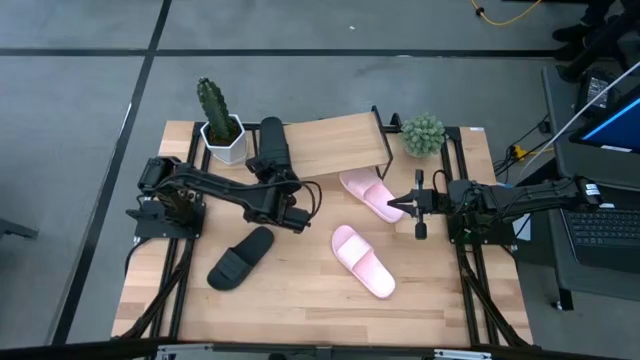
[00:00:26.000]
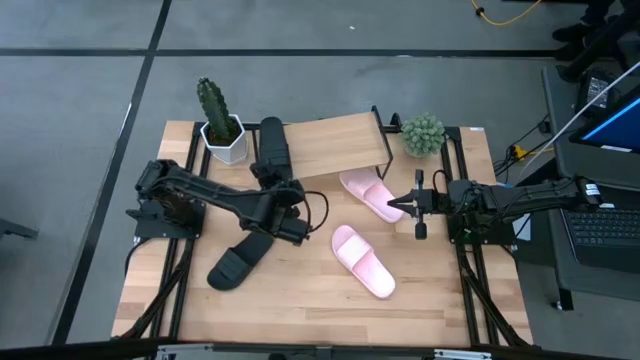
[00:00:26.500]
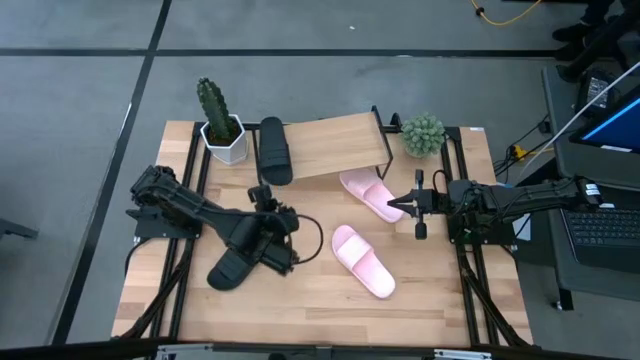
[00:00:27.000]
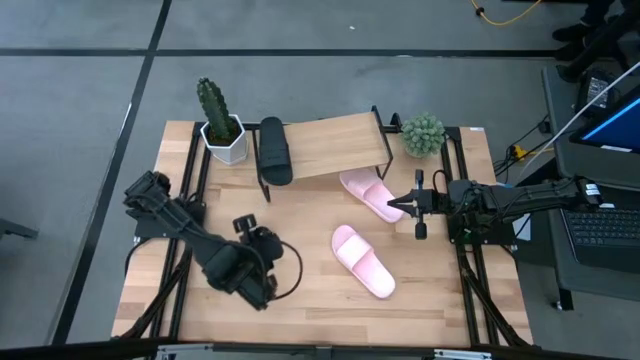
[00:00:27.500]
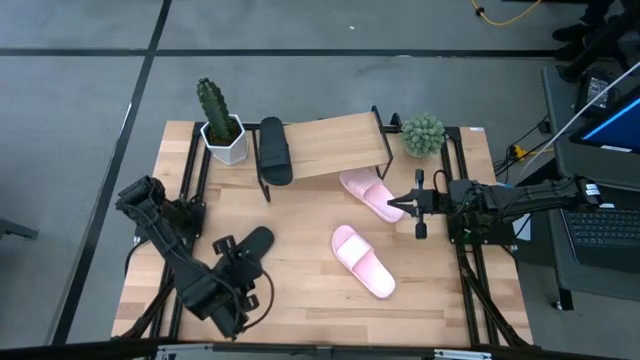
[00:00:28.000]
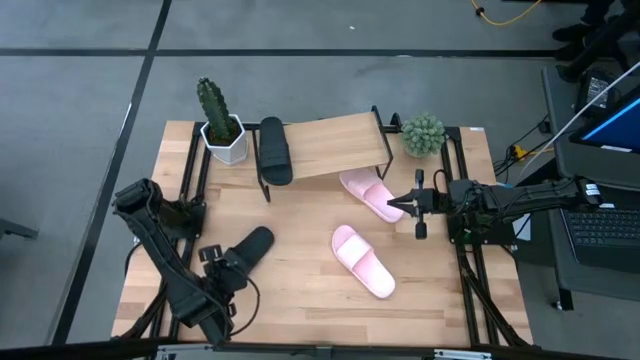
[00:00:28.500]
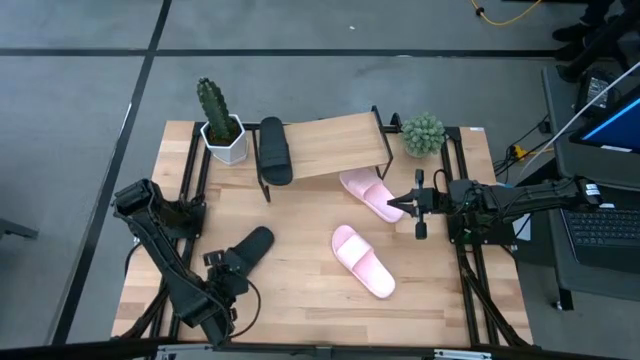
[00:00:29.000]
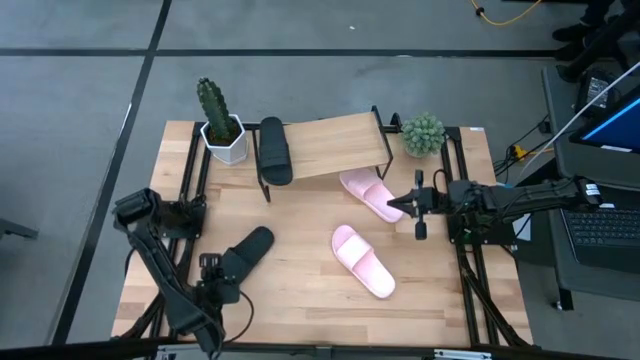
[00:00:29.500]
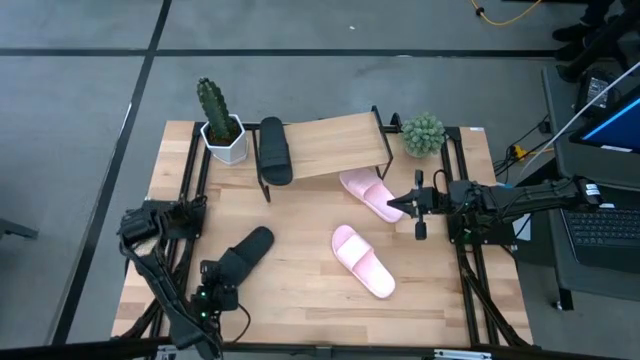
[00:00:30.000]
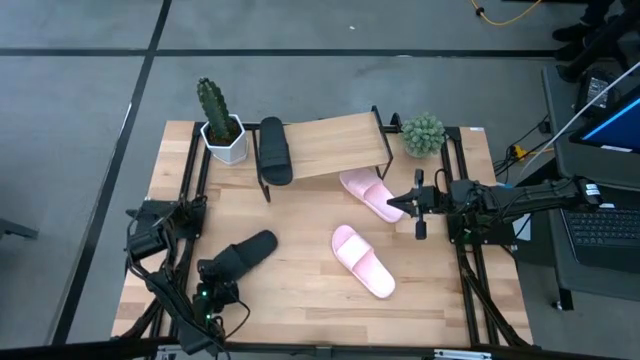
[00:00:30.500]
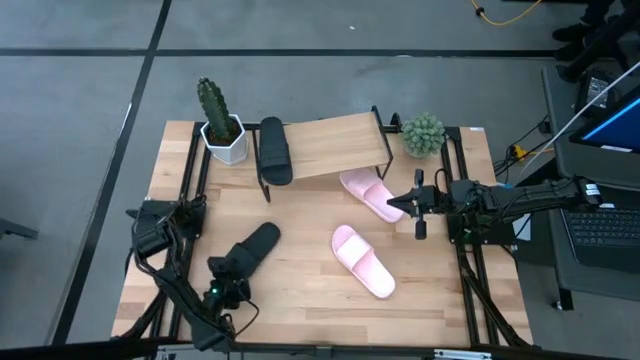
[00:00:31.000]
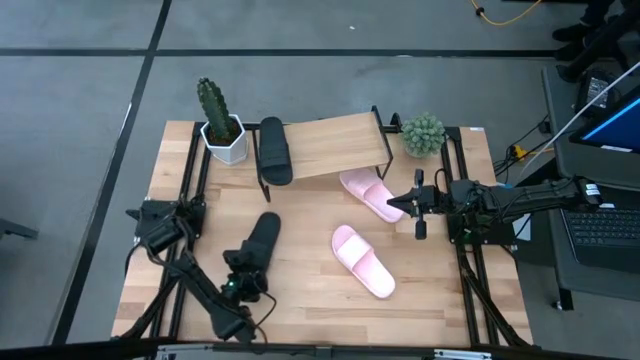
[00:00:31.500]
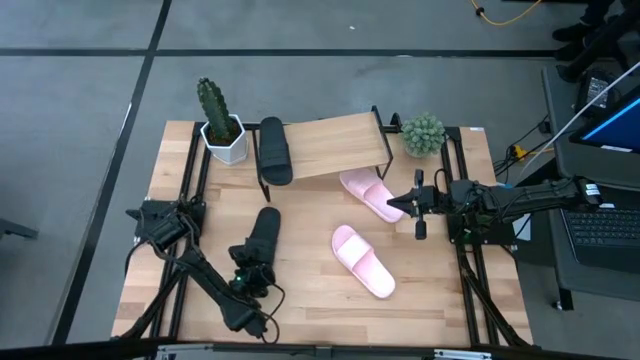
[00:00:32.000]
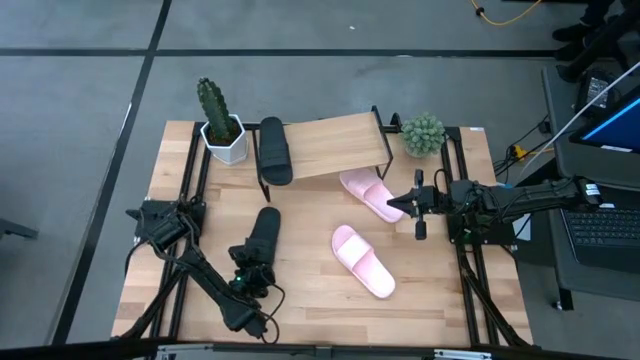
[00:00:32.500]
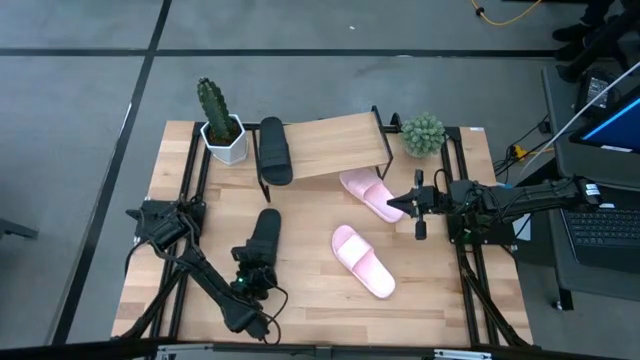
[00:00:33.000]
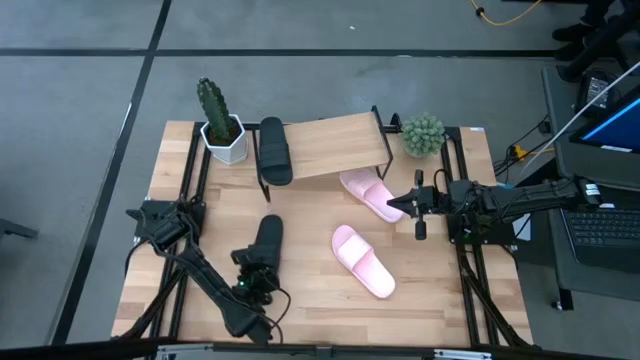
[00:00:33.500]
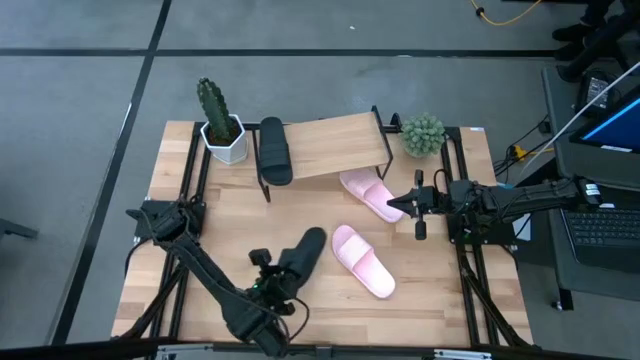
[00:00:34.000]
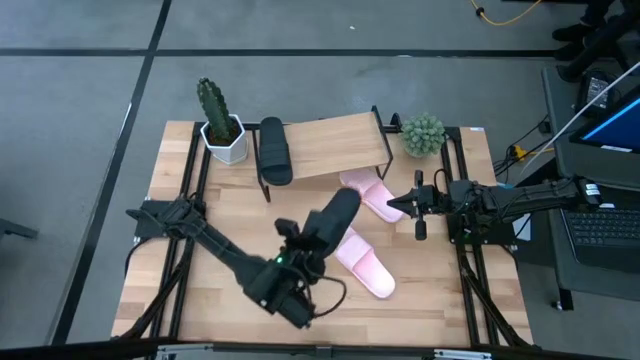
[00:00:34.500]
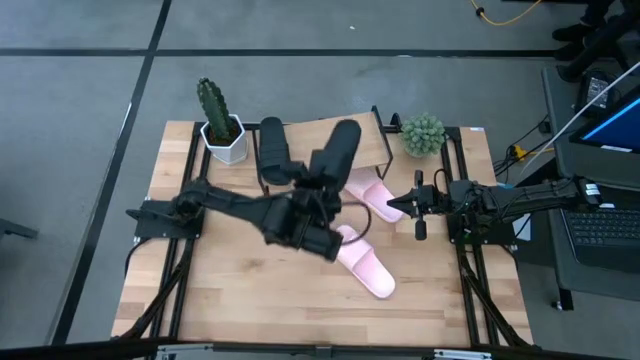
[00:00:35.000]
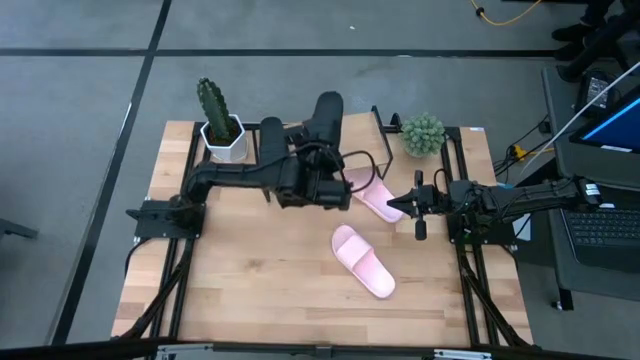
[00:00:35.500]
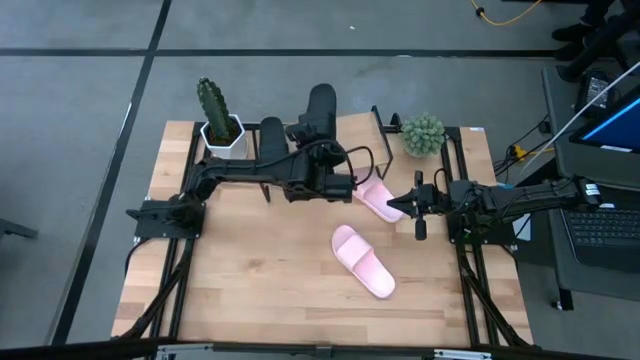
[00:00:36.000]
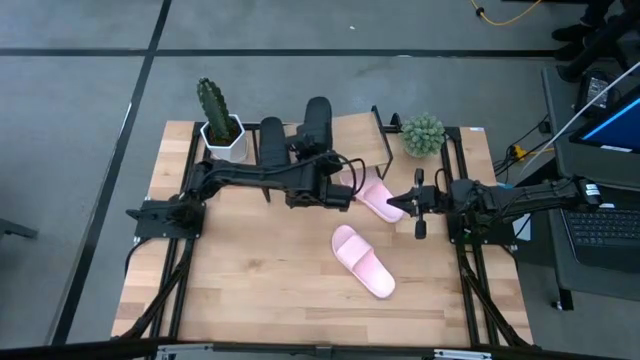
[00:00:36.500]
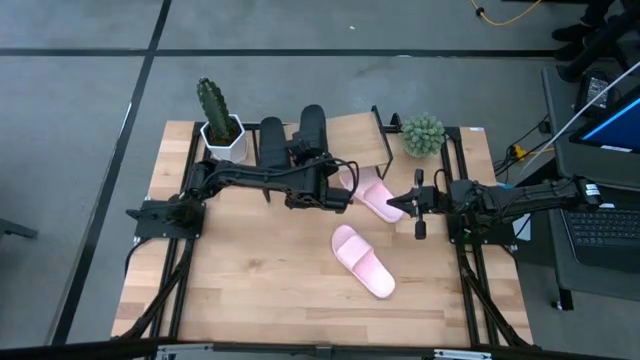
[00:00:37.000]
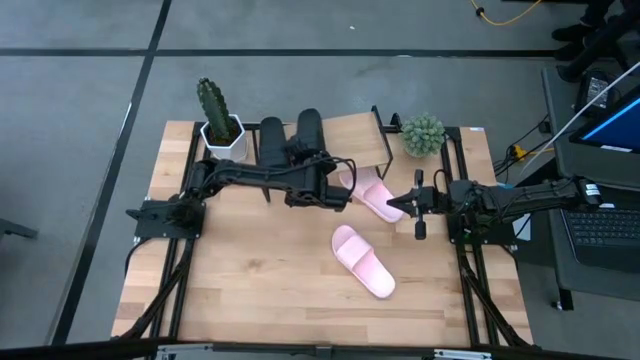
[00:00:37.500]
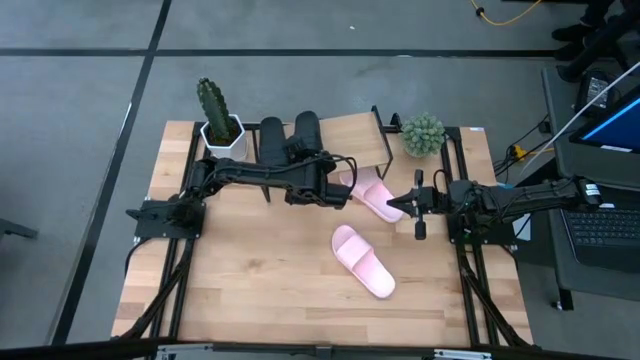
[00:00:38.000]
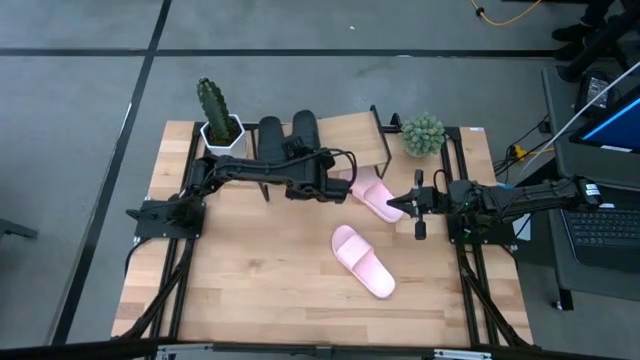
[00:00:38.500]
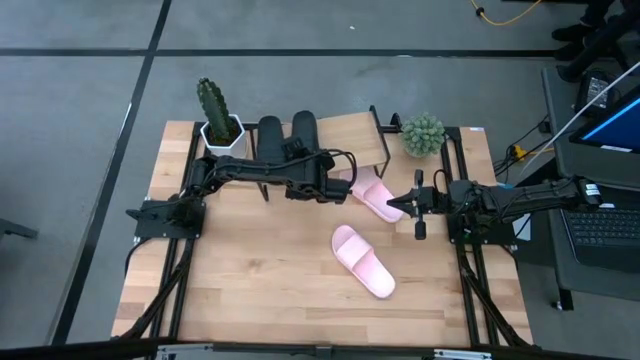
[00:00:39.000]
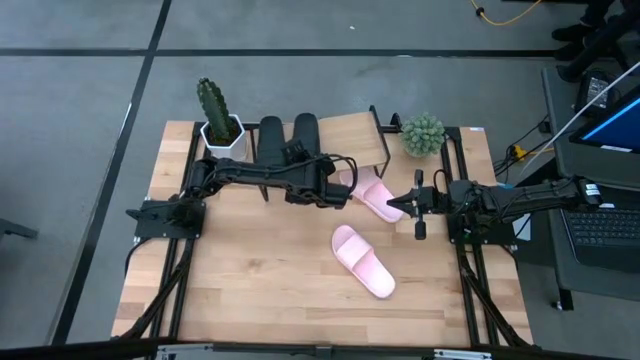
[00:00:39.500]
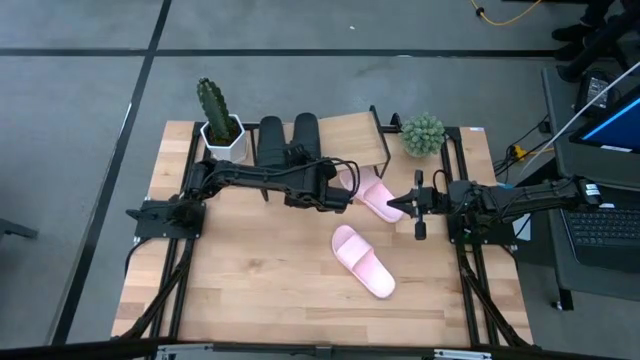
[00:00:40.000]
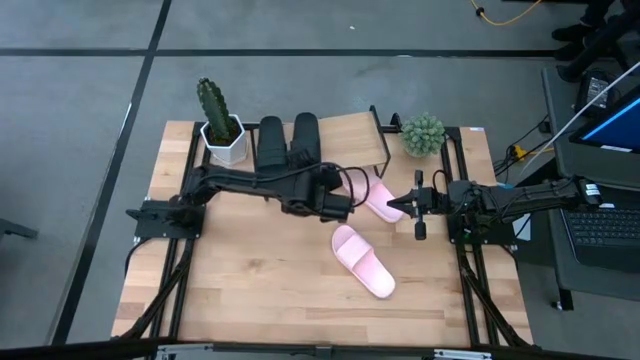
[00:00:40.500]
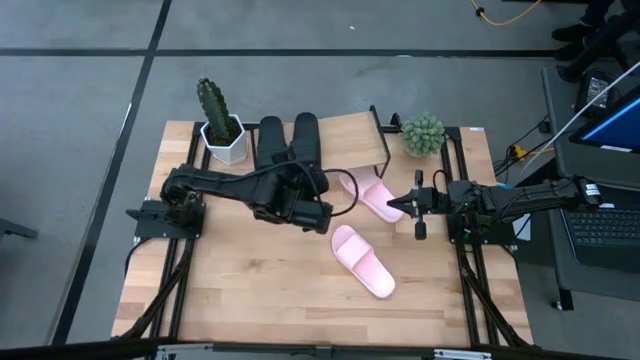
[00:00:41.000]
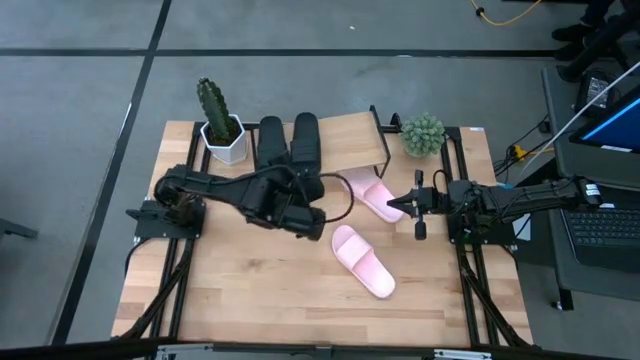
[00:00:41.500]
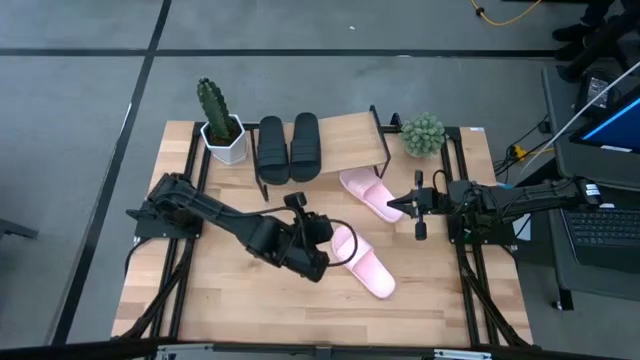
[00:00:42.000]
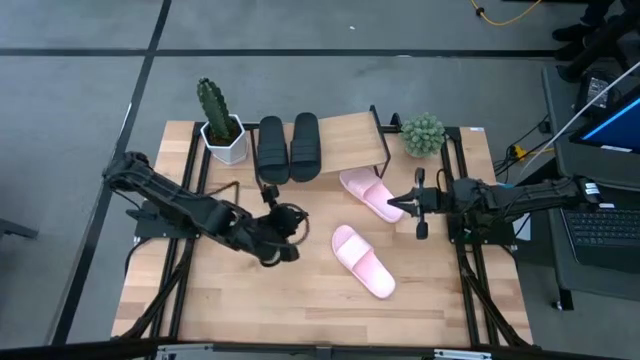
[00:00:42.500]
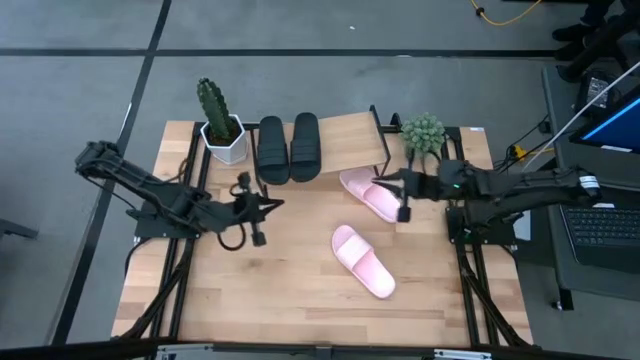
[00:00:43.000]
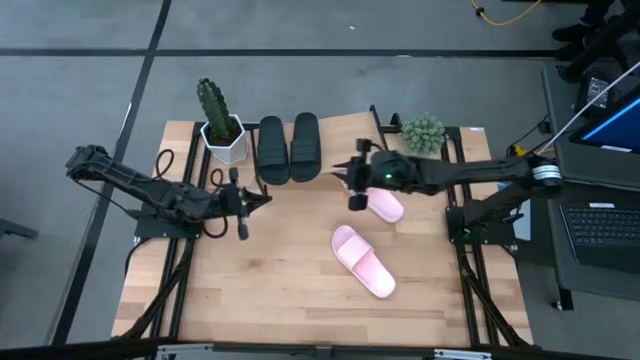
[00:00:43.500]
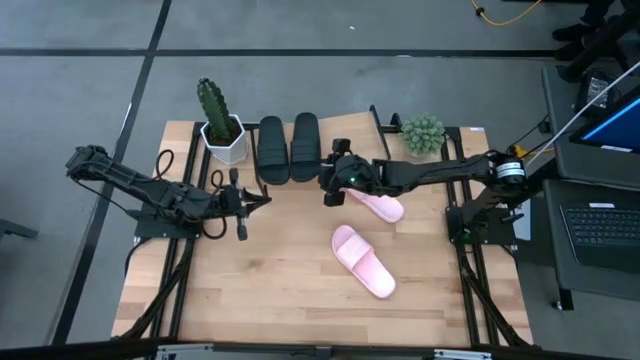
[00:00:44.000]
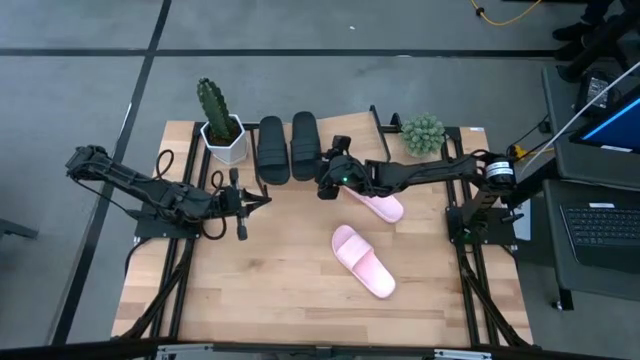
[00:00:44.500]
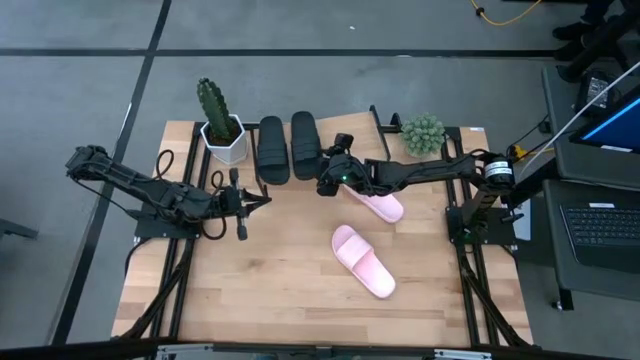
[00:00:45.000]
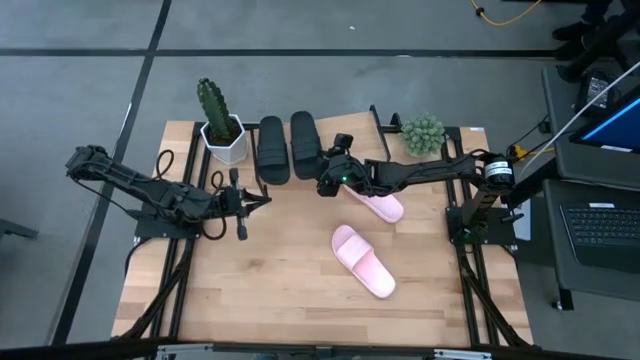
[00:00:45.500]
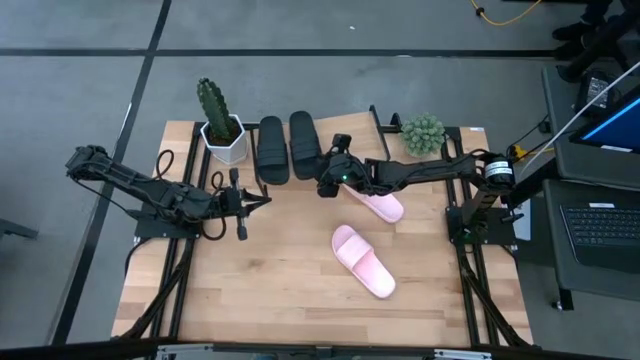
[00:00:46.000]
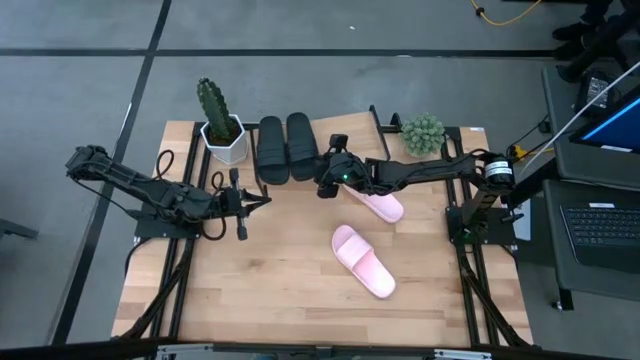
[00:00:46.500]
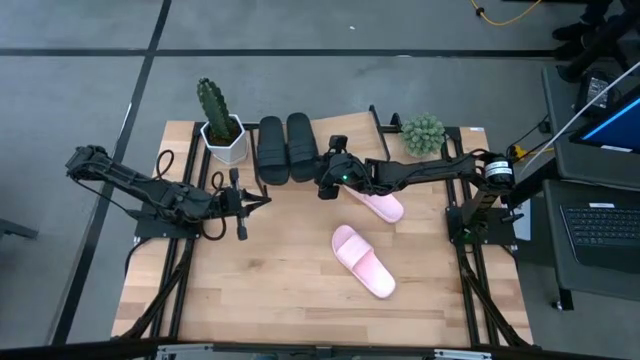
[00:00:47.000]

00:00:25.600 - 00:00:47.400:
Task: Pick and place slides into the shelf
Put the black slide on the shelf
